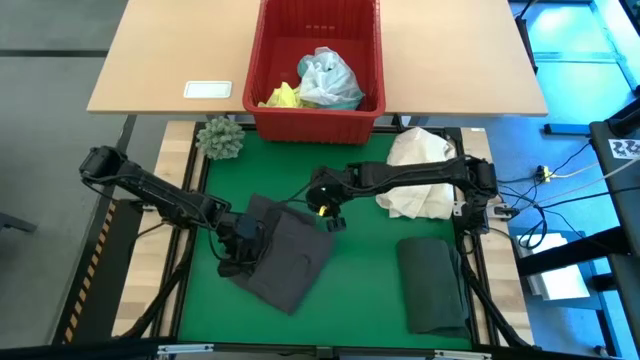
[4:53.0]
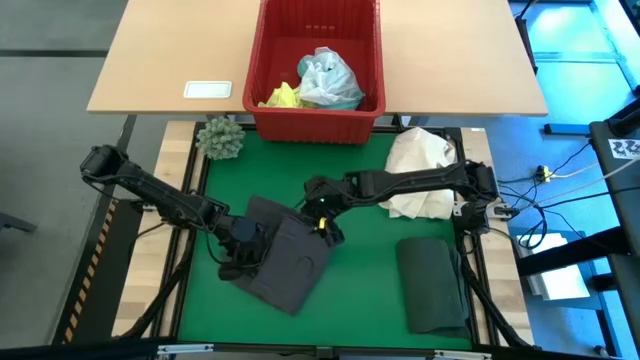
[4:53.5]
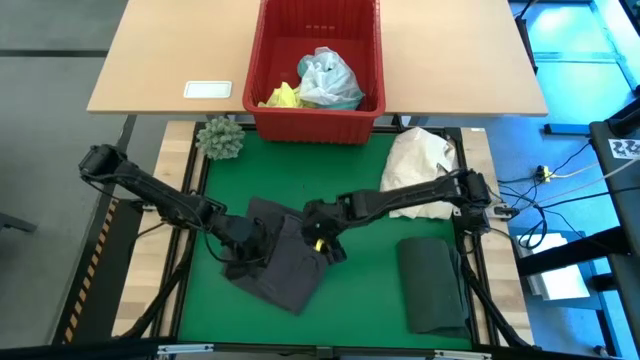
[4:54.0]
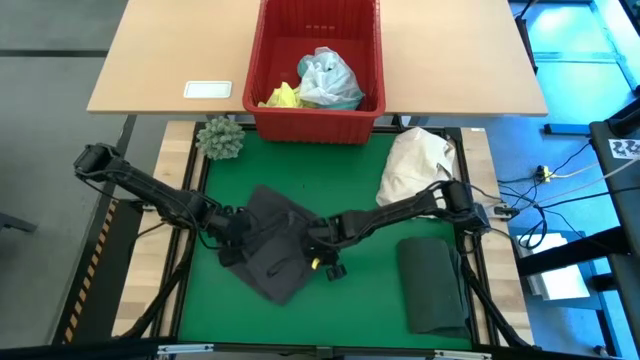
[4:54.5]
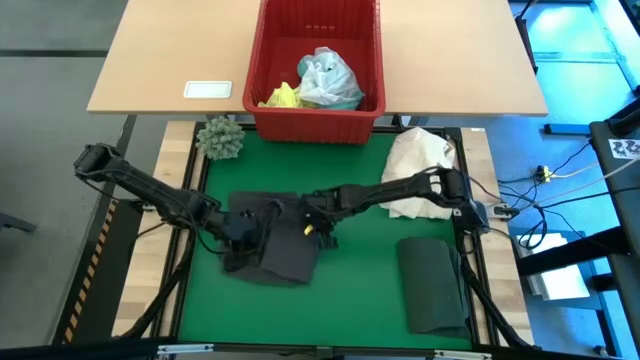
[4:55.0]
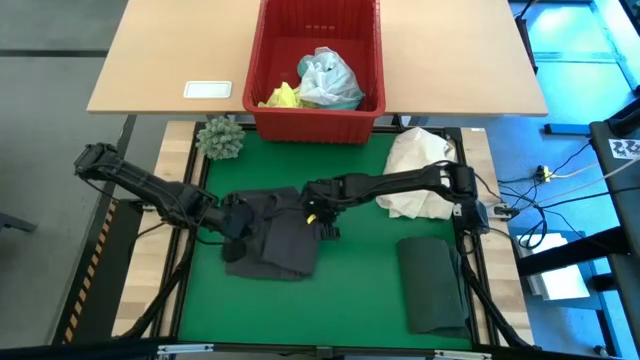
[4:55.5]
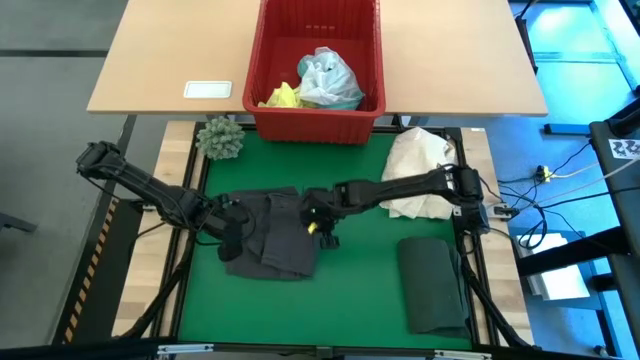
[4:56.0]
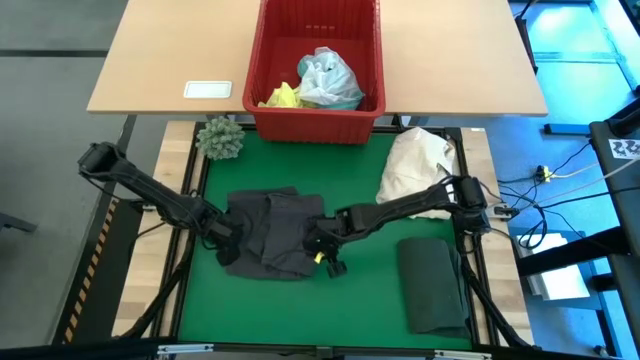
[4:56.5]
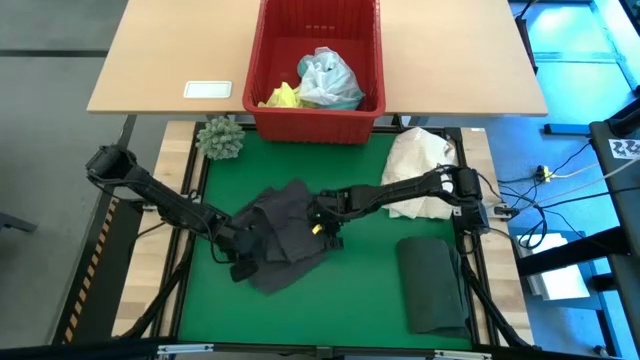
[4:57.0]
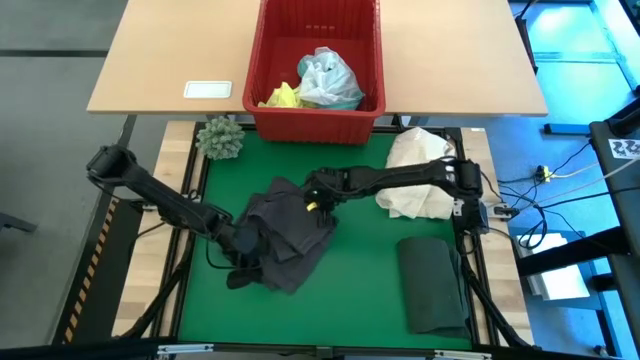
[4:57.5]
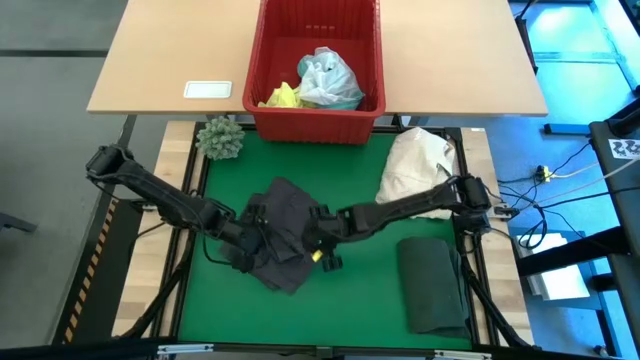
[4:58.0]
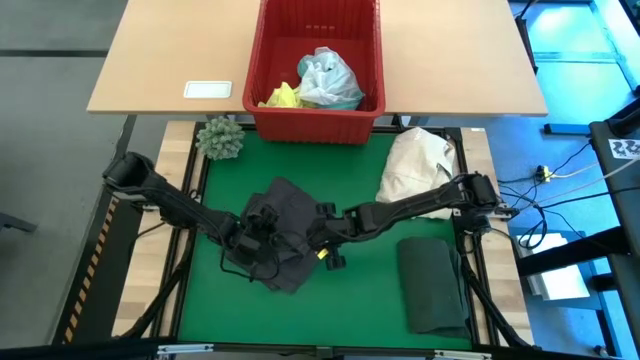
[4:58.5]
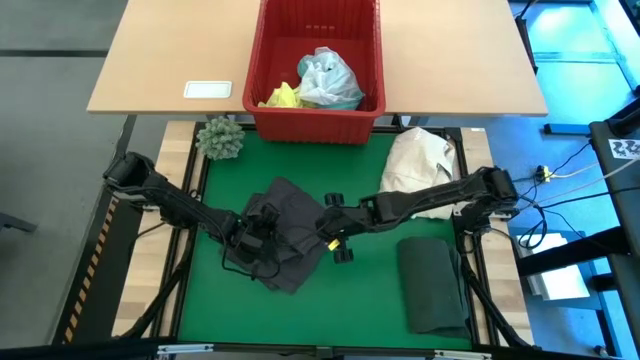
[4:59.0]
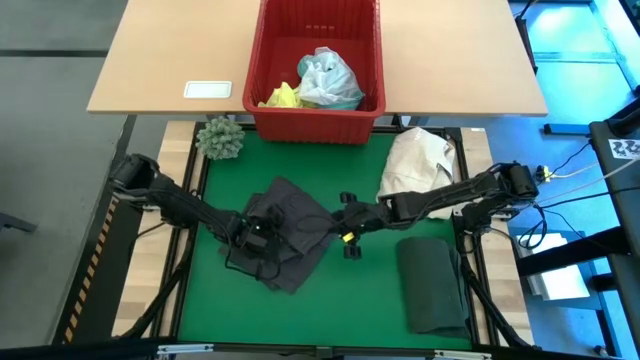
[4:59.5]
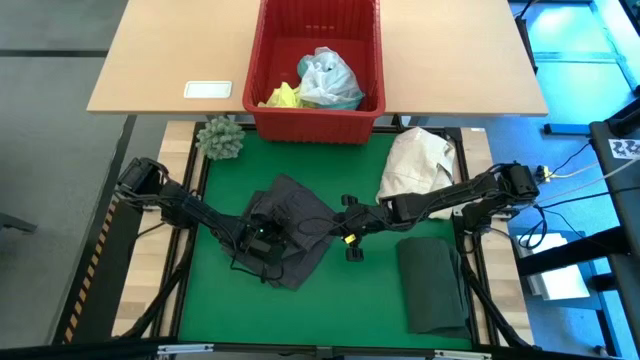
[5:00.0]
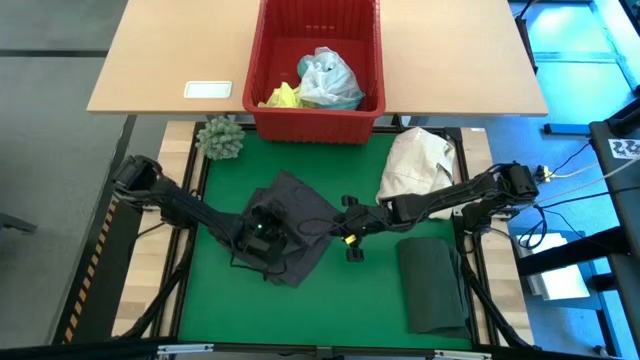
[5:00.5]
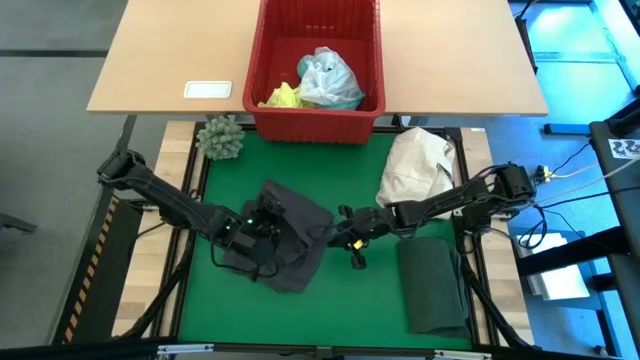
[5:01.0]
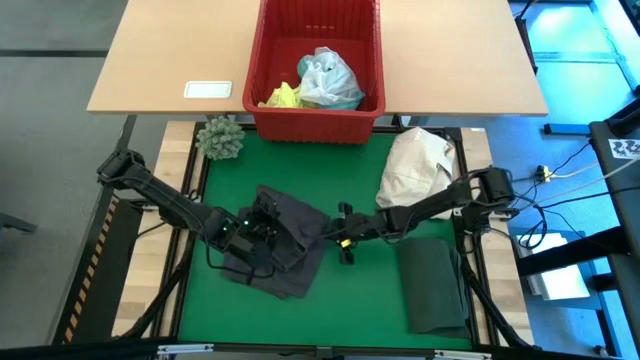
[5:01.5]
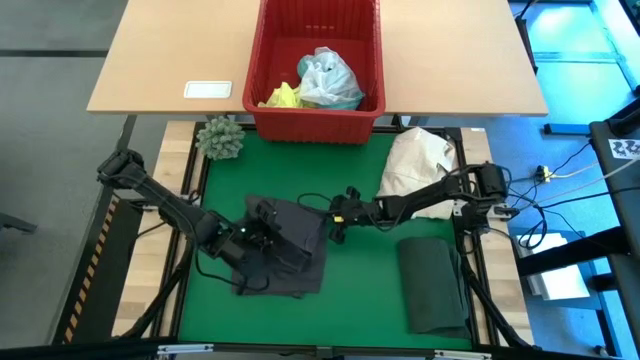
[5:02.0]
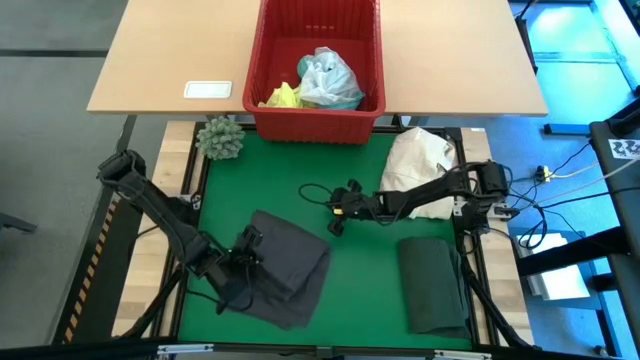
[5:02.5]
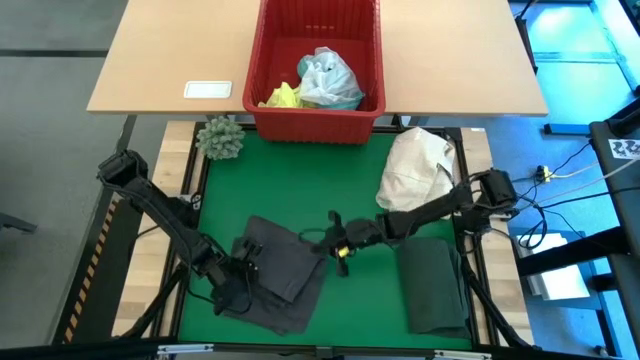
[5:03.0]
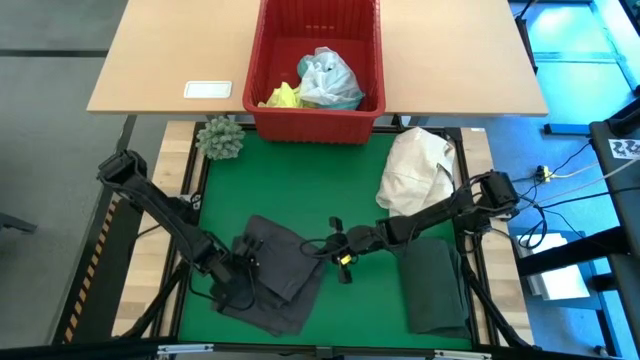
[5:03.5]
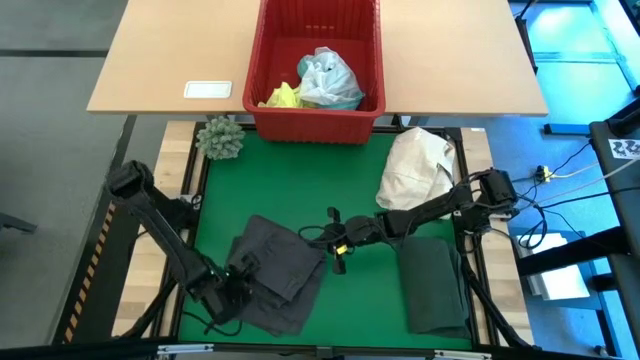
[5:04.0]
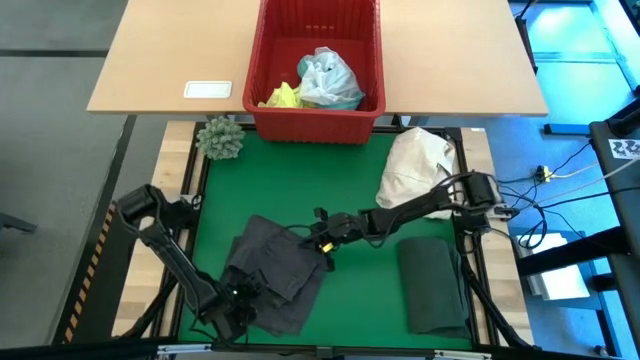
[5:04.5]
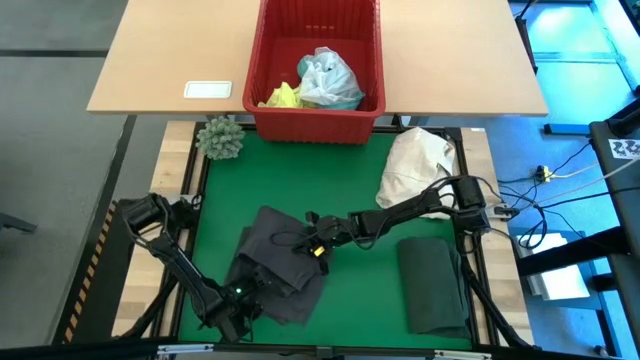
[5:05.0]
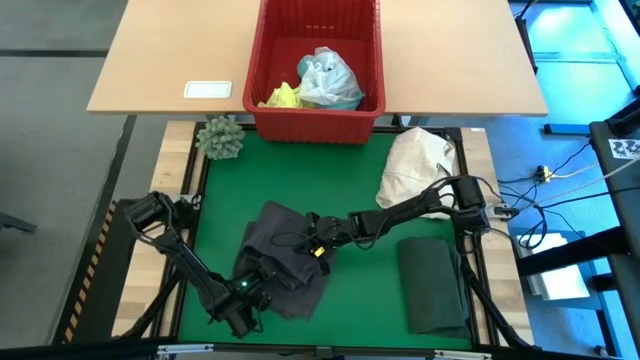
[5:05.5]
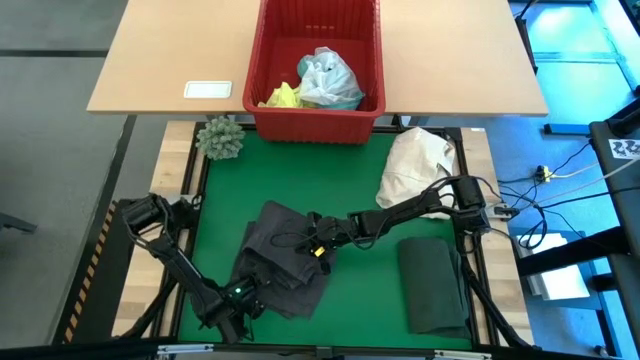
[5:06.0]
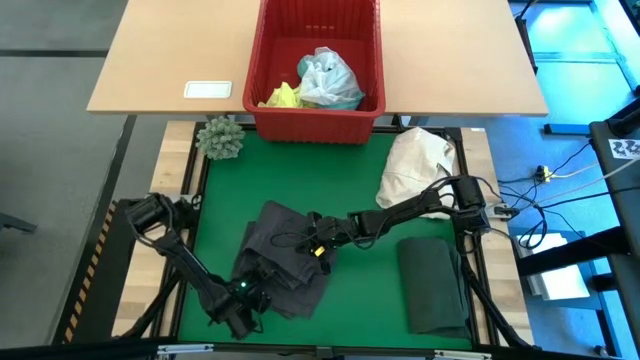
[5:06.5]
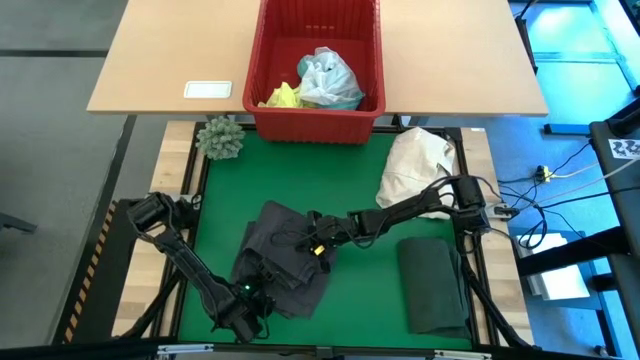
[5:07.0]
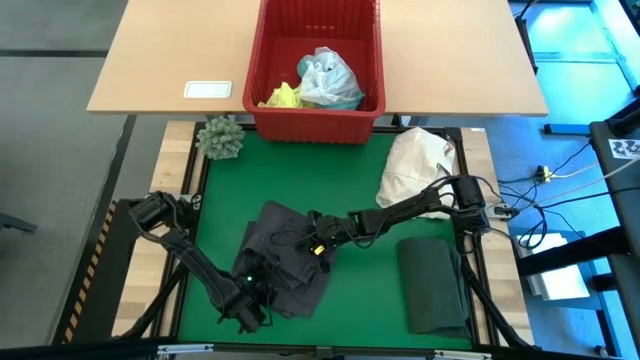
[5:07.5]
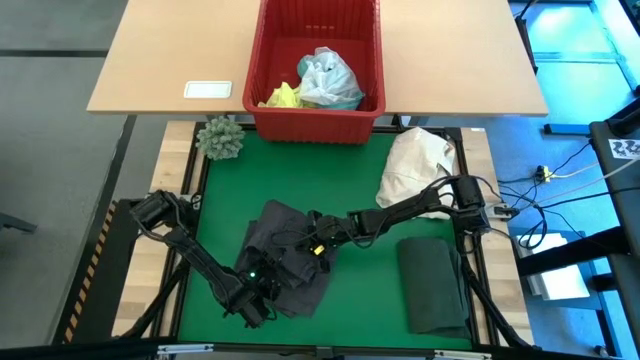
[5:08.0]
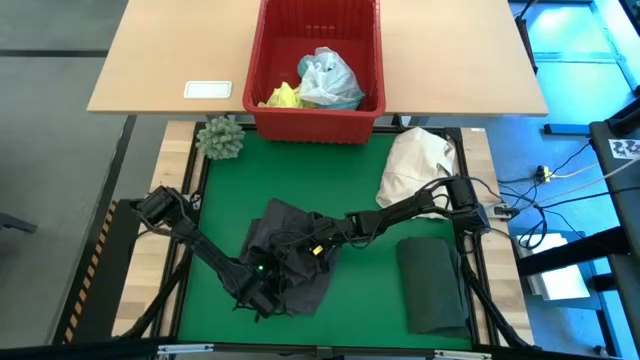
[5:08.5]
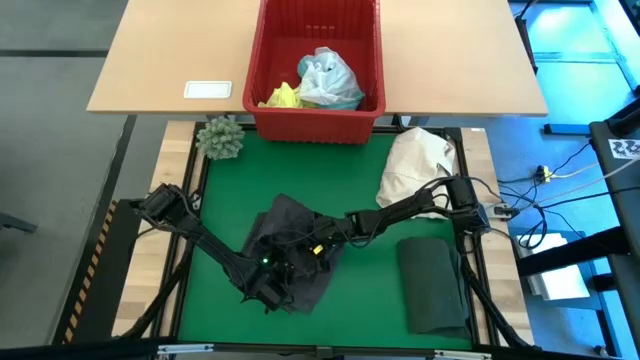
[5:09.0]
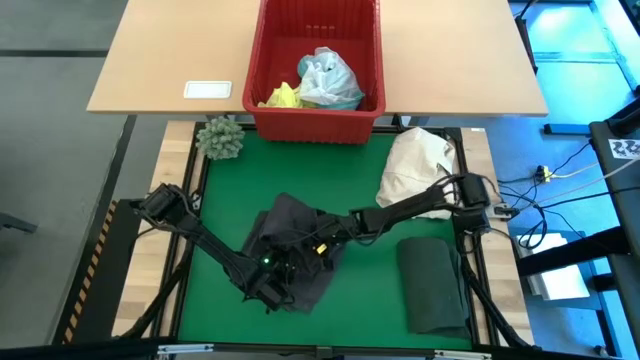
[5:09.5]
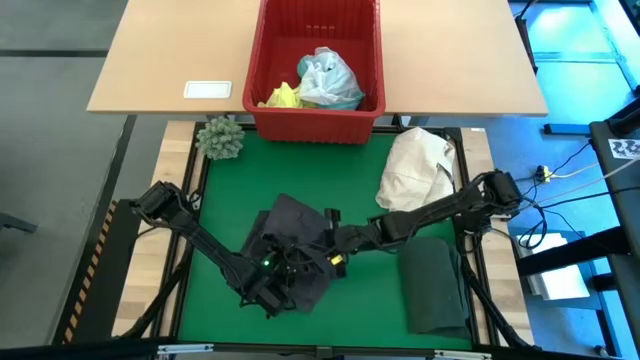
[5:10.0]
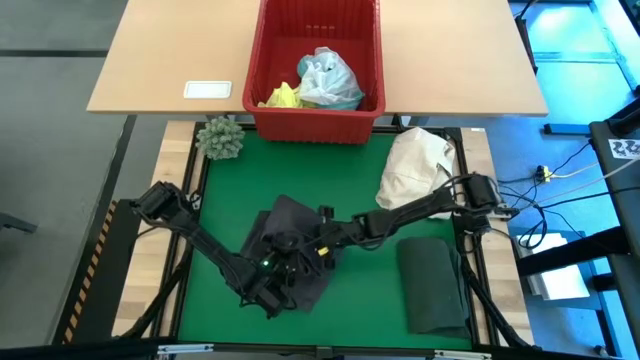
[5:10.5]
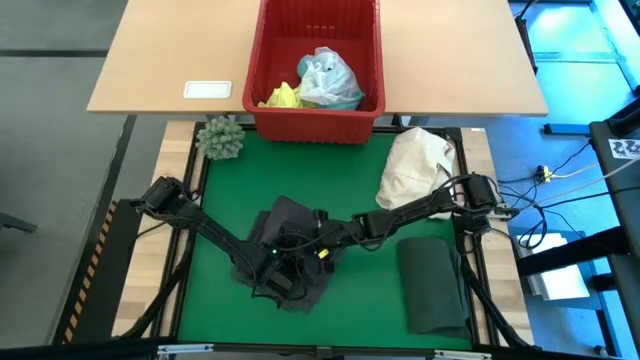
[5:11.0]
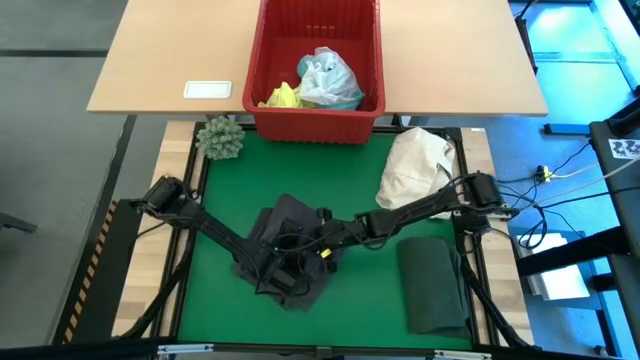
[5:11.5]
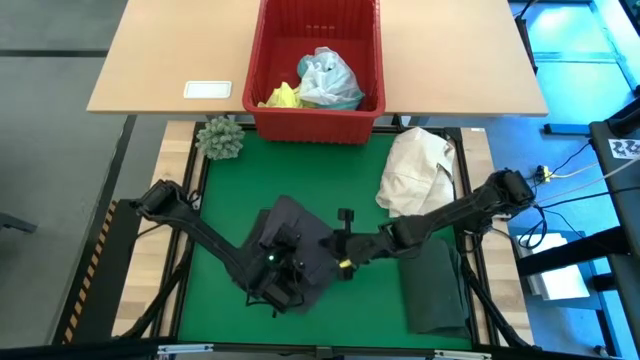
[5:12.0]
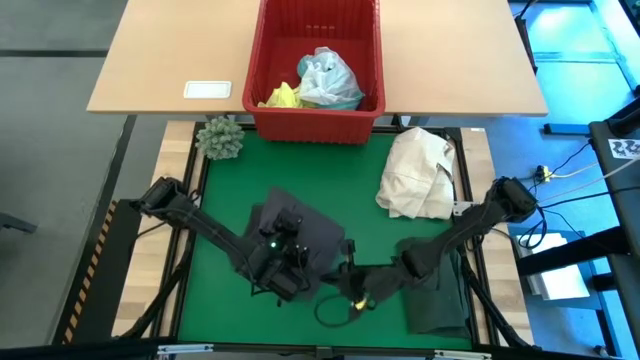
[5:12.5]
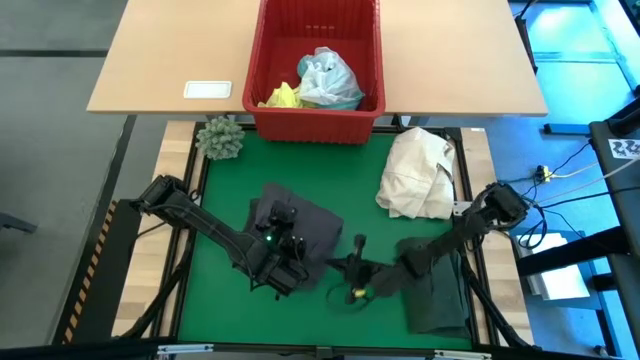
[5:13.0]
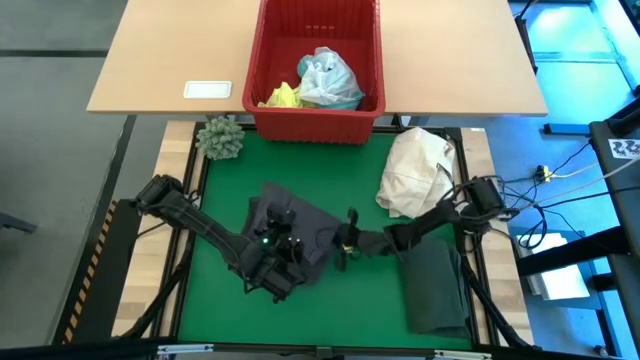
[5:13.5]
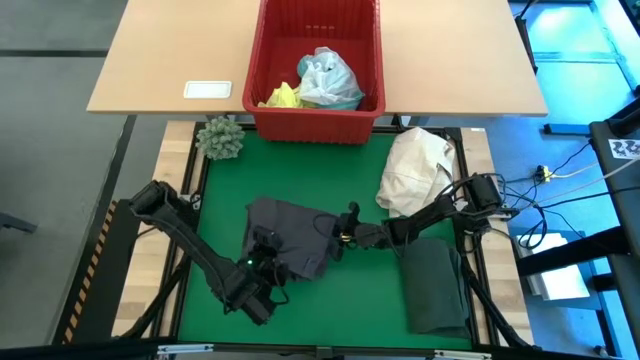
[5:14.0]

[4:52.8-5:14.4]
Task: Fold Laundry from Bin
Fold the gray short
